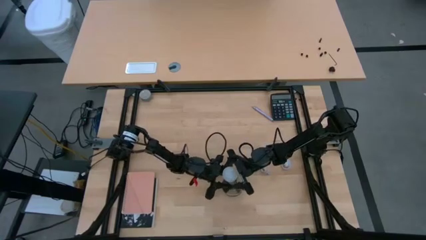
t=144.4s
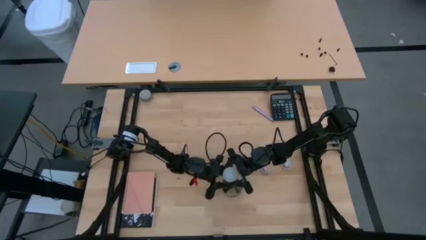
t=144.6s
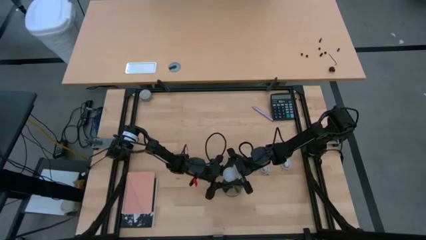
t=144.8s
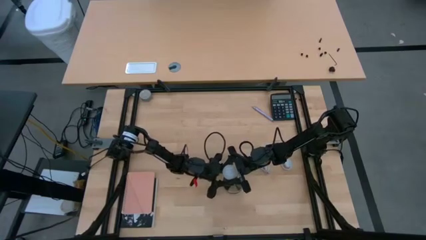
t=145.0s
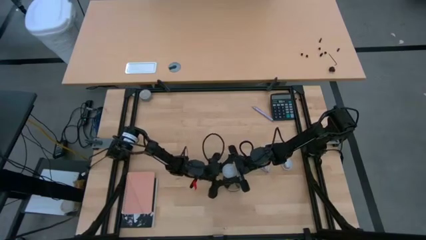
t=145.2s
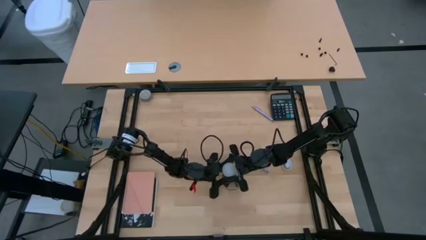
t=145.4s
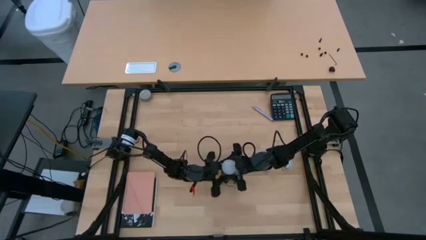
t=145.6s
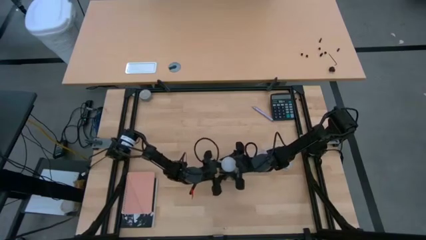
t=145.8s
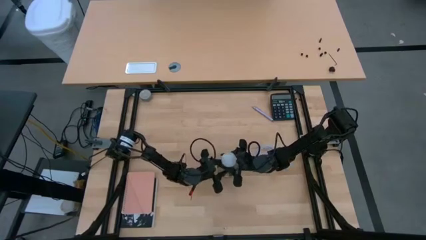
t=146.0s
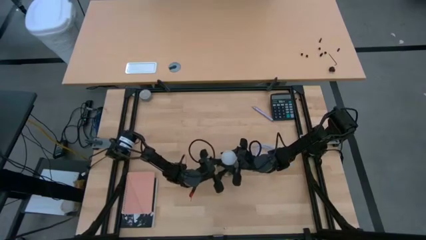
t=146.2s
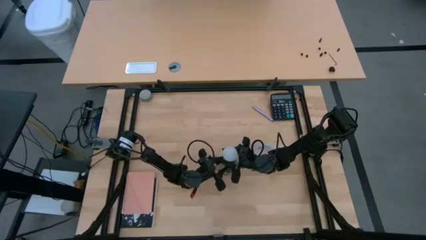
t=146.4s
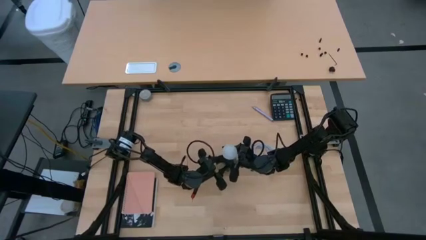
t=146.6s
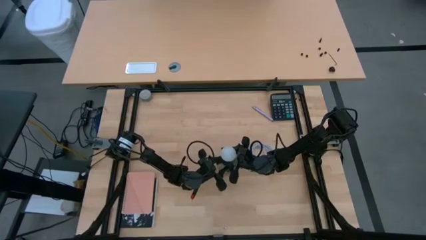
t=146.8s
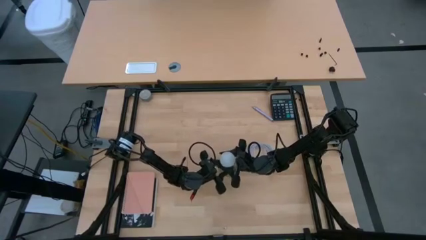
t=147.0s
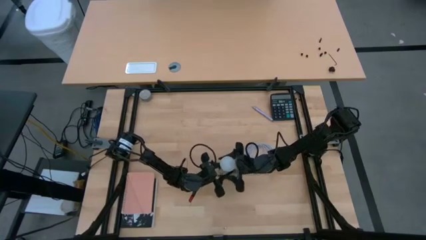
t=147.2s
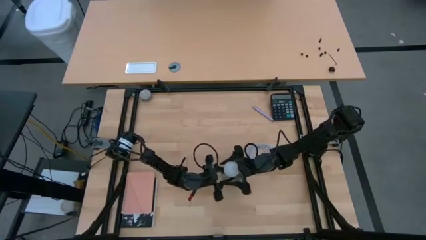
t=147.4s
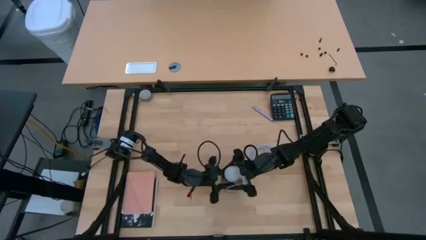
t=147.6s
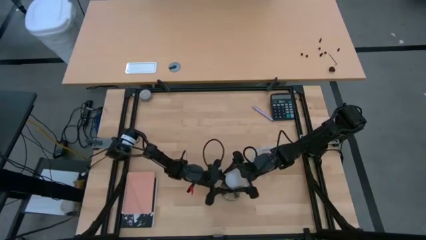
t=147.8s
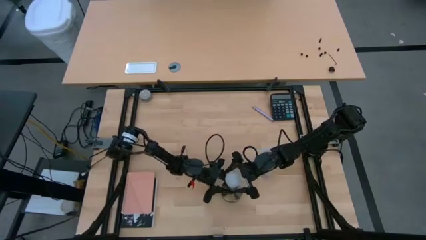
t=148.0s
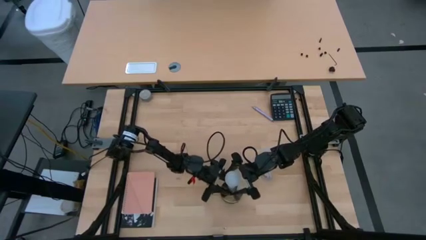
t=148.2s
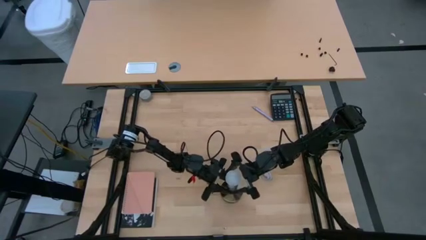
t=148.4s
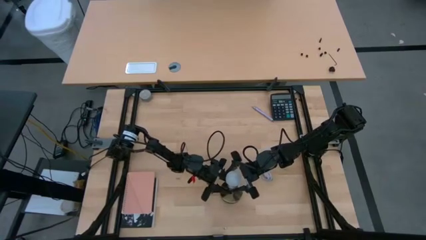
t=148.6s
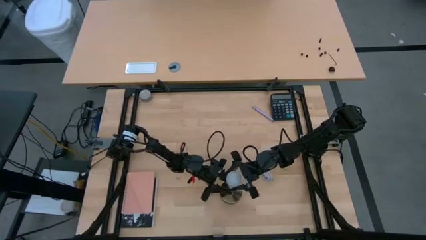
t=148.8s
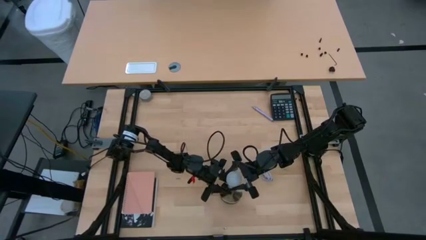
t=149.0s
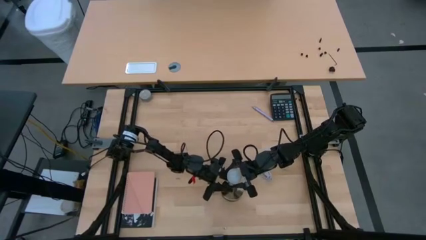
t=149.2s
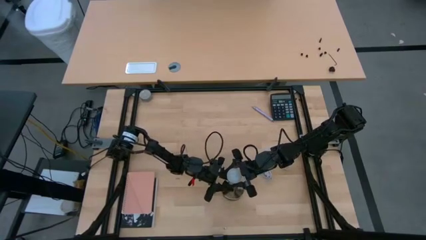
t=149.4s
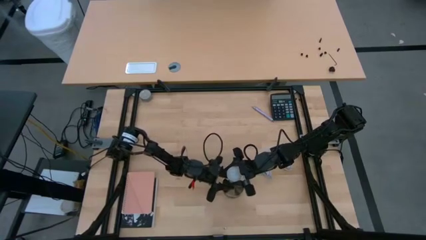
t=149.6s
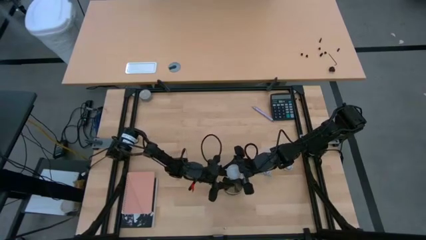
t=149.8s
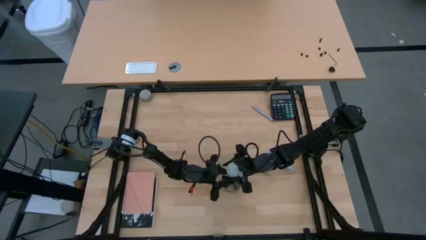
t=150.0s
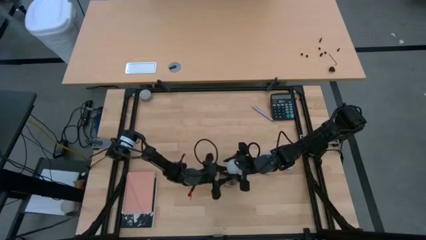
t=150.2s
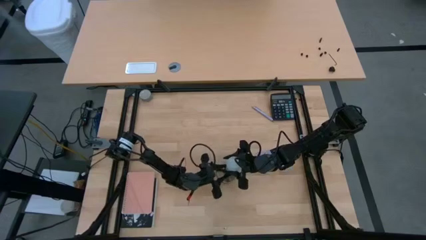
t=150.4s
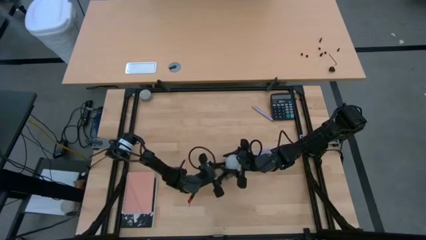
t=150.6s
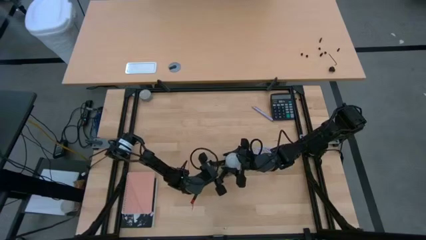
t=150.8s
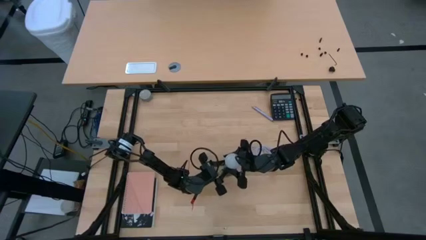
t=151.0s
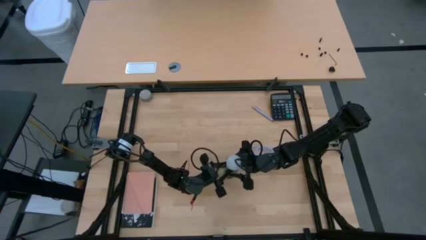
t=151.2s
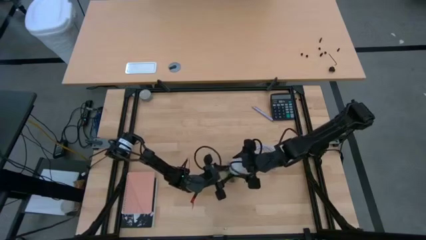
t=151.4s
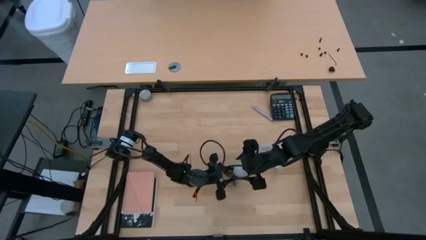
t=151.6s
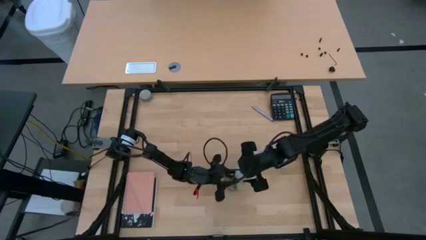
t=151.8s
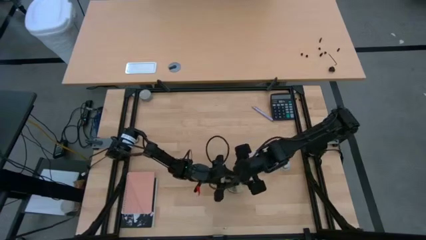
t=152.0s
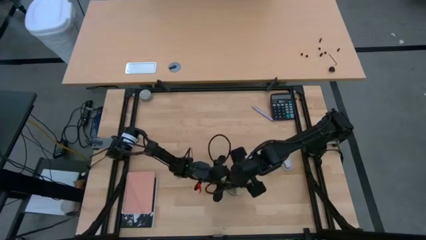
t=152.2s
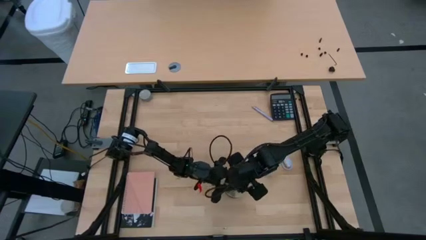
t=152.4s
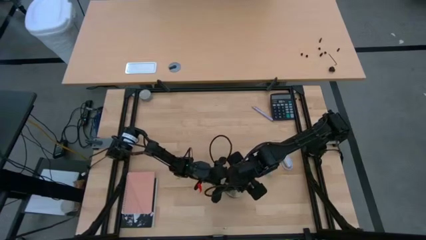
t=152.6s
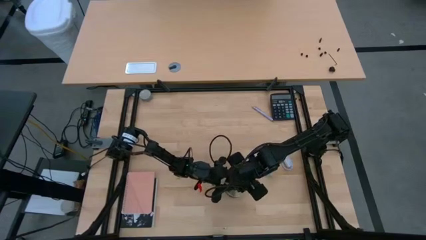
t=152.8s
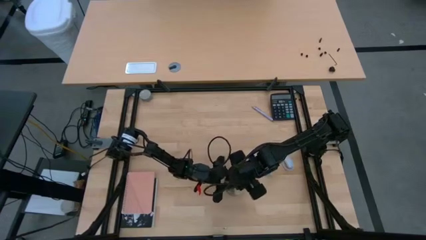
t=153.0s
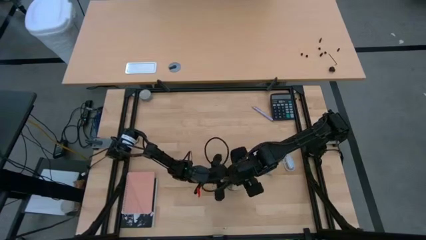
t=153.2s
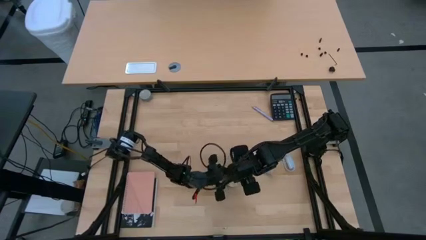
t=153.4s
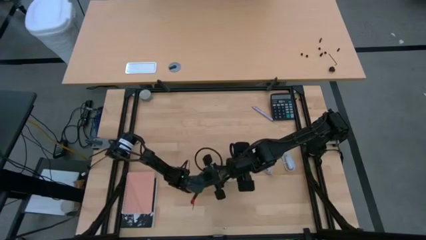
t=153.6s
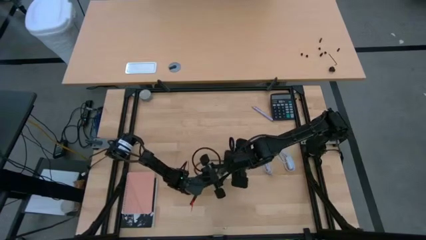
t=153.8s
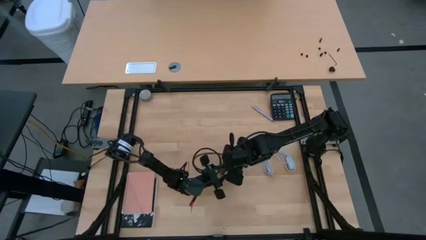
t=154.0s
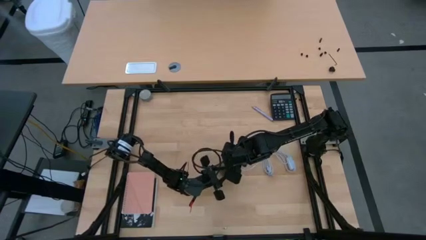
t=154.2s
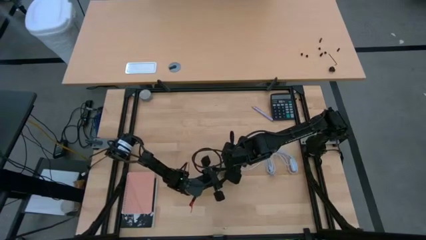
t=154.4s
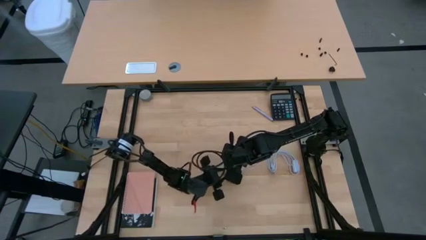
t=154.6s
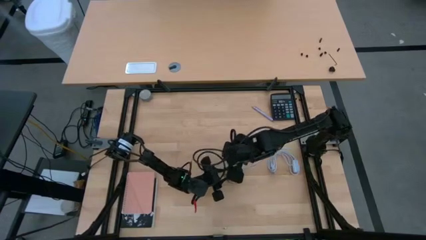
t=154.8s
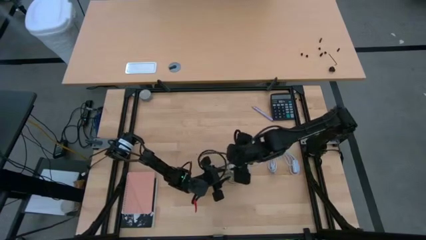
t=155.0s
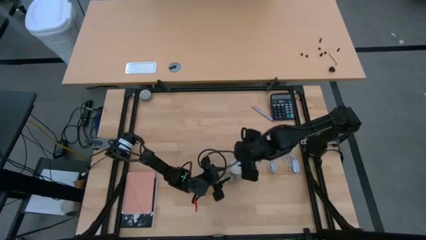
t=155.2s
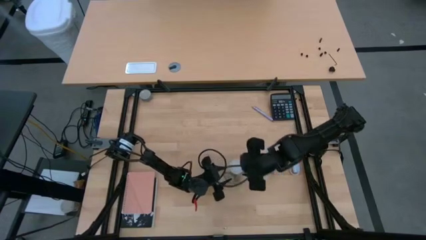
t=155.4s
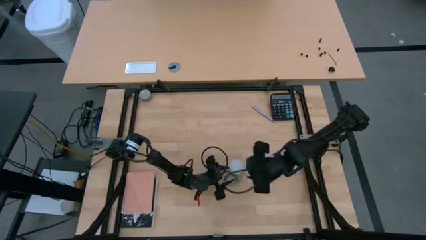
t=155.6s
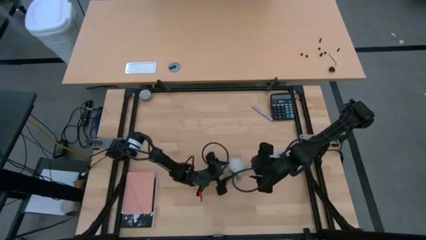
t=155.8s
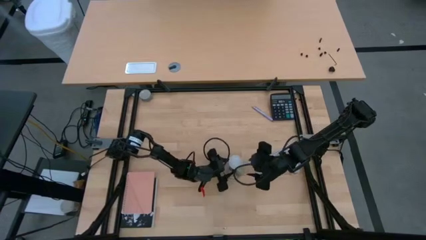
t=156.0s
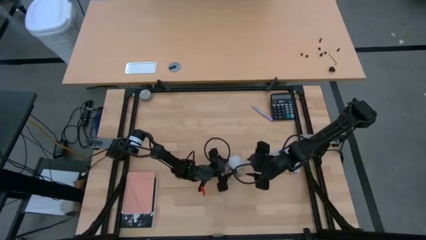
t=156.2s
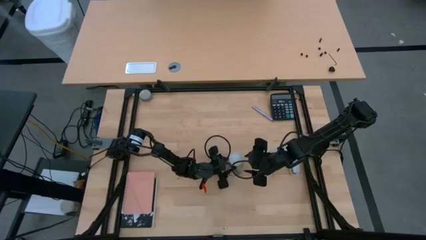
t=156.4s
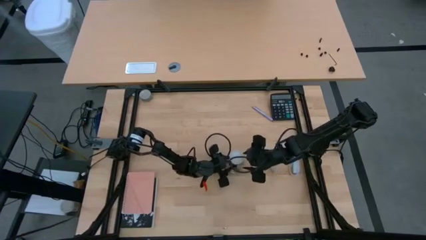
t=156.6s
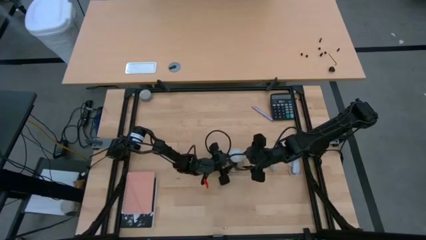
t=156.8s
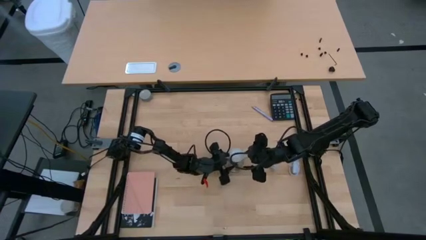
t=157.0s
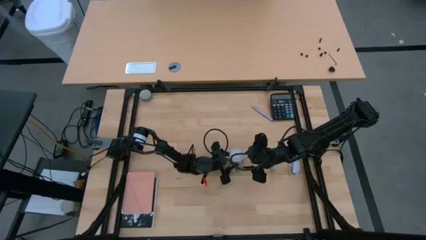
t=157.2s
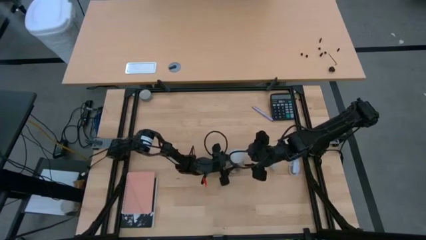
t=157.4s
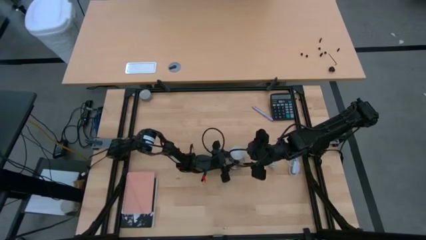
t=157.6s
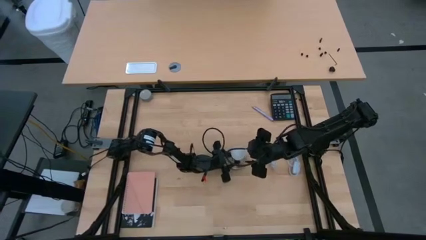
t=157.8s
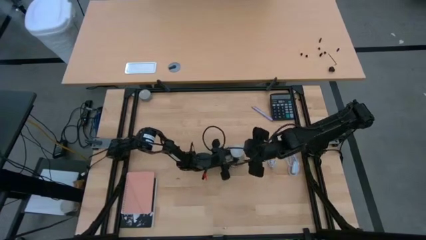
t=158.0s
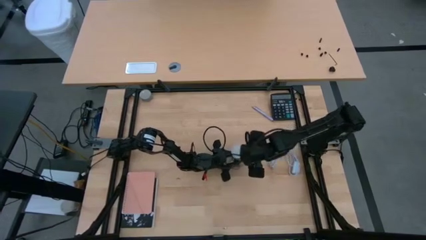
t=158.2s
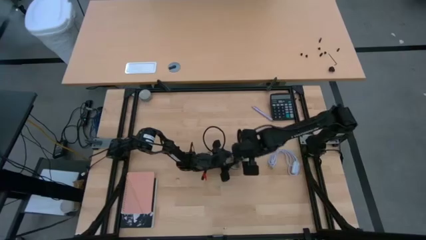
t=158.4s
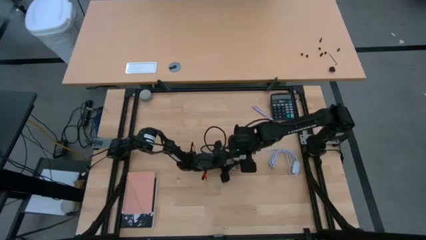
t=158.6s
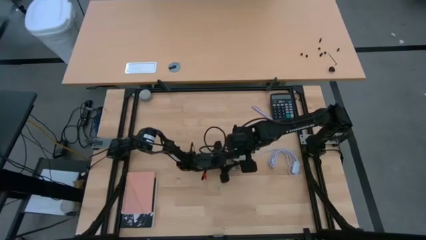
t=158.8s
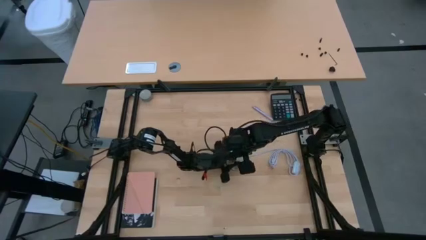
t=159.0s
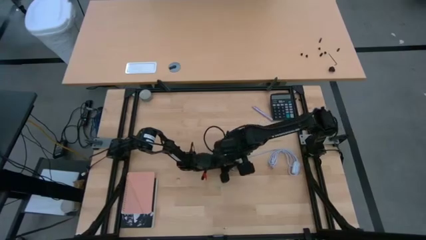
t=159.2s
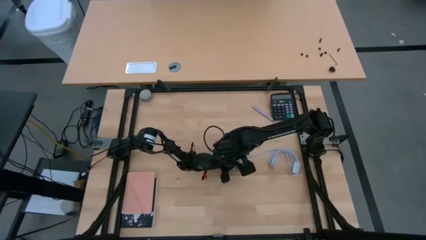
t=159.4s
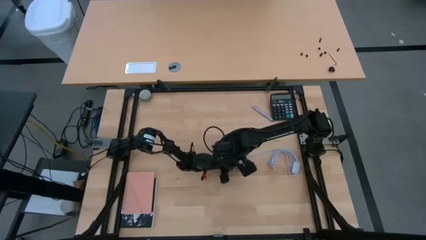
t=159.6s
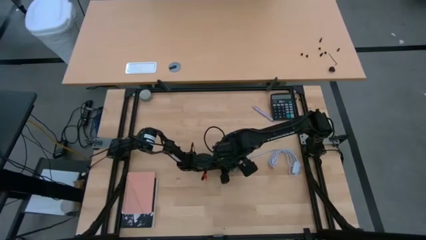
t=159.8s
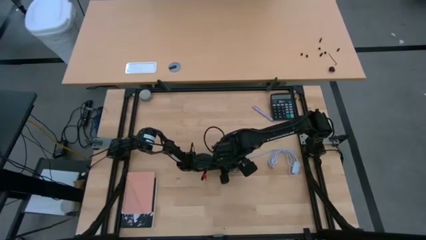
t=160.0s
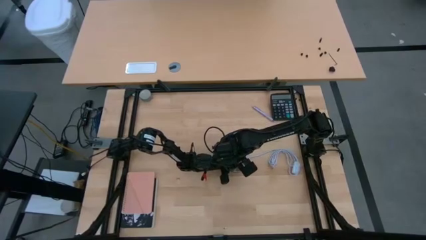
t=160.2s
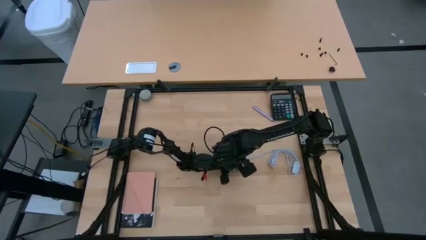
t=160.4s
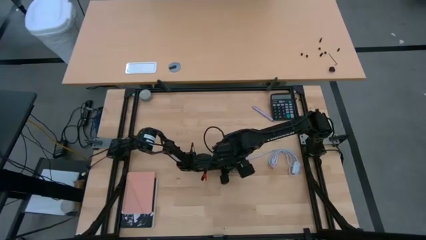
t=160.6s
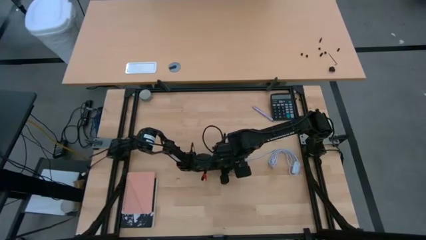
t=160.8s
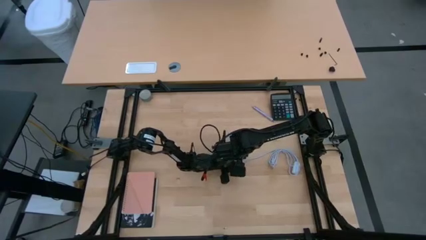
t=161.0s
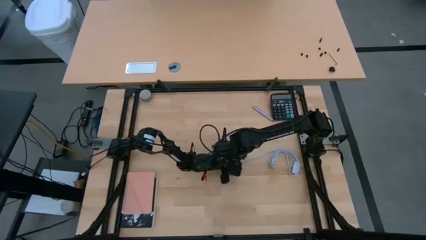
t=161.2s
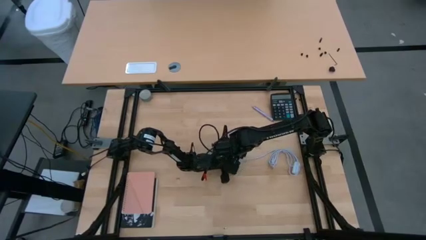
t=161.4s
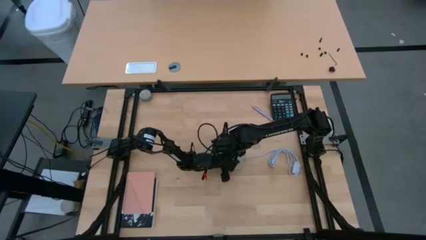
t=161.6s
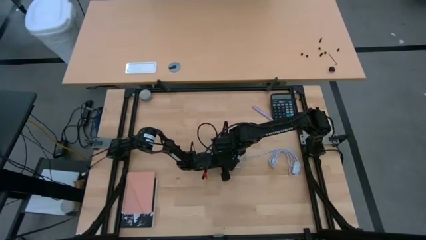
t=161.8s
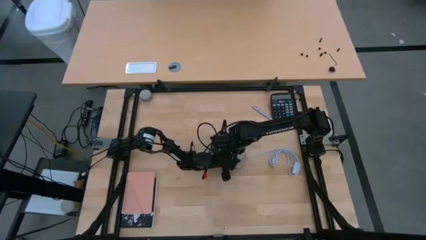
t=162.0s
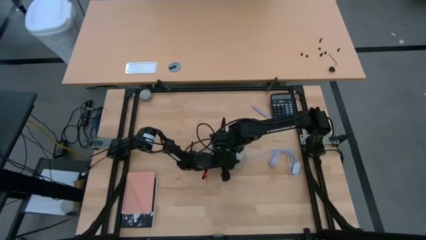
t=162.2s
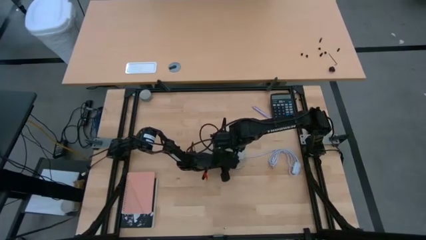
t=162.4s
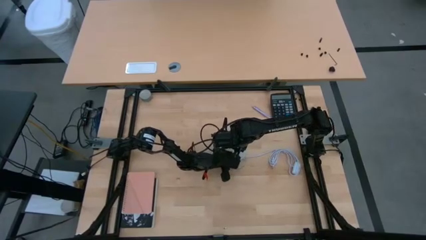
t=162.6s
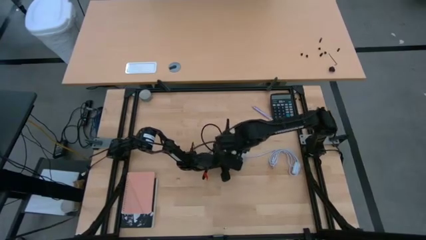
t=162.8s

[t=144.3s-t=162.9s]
Task: Screw lightbulb
Insert the lightbulb on the lamp
